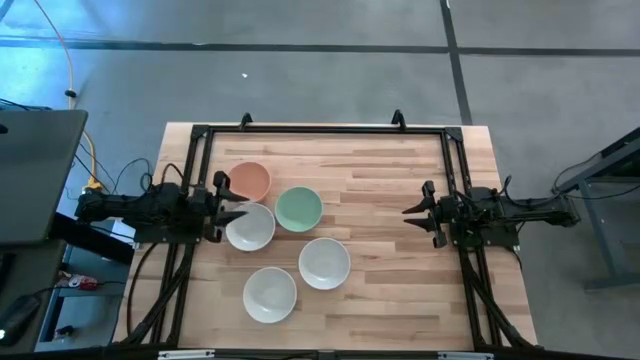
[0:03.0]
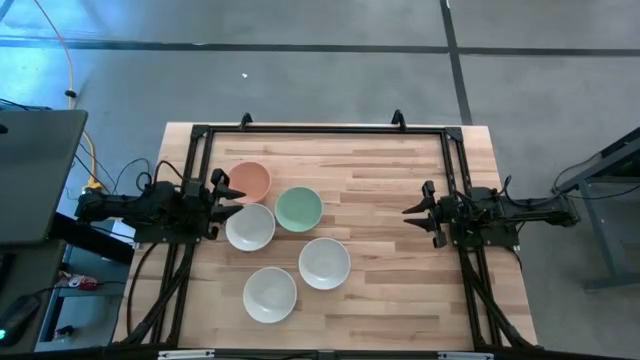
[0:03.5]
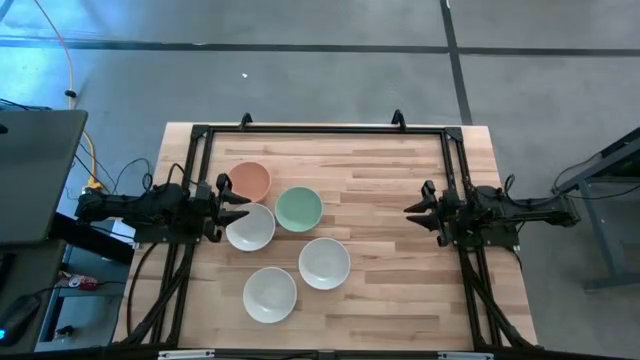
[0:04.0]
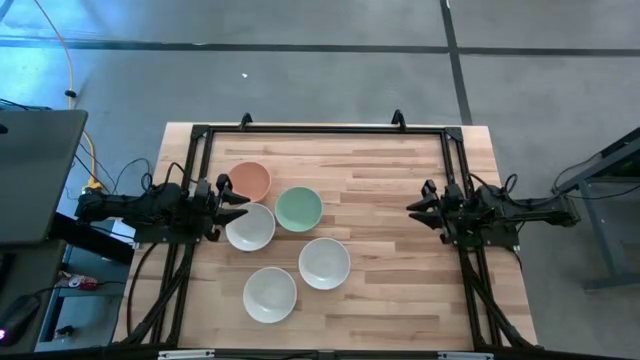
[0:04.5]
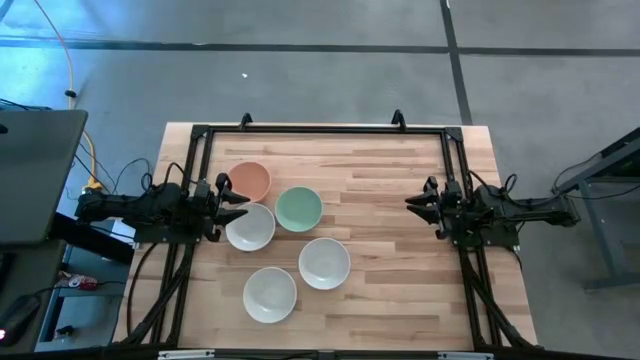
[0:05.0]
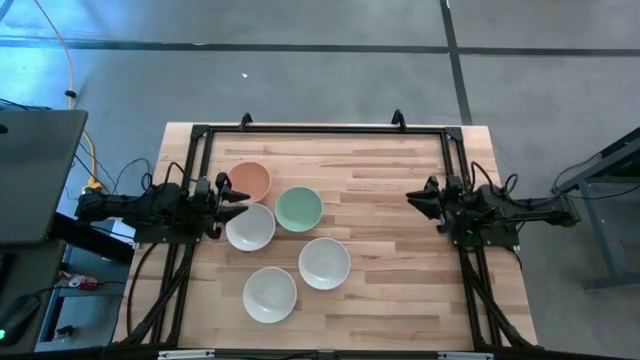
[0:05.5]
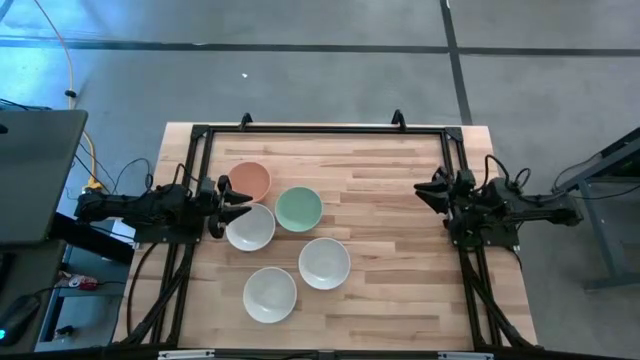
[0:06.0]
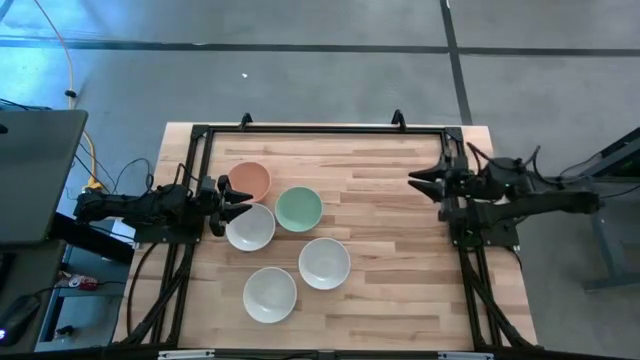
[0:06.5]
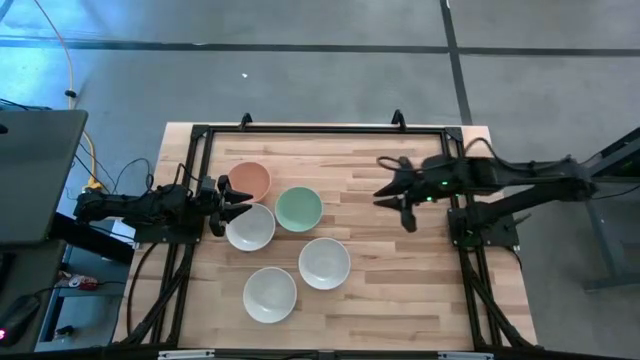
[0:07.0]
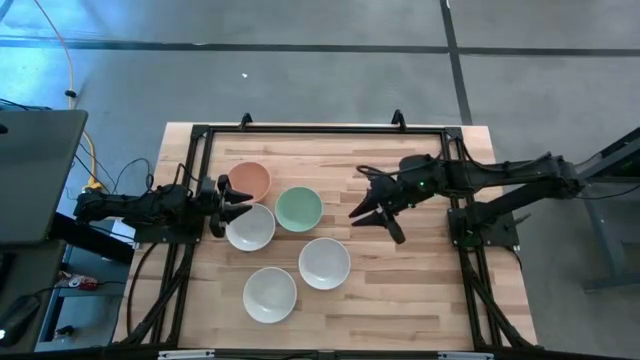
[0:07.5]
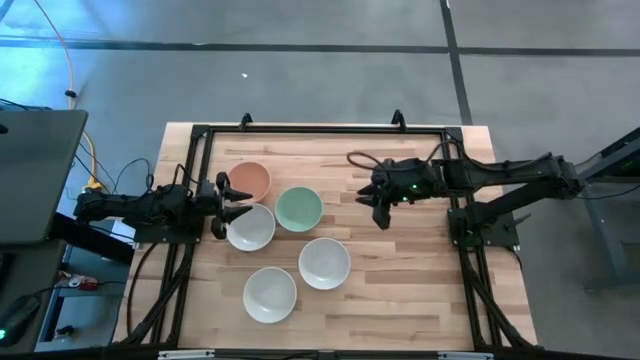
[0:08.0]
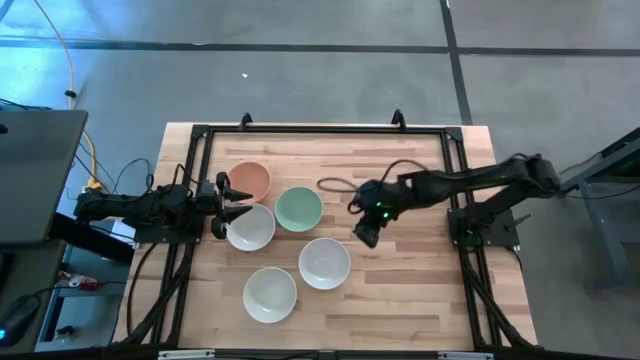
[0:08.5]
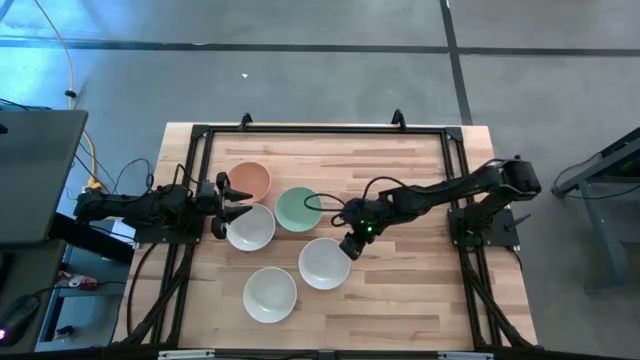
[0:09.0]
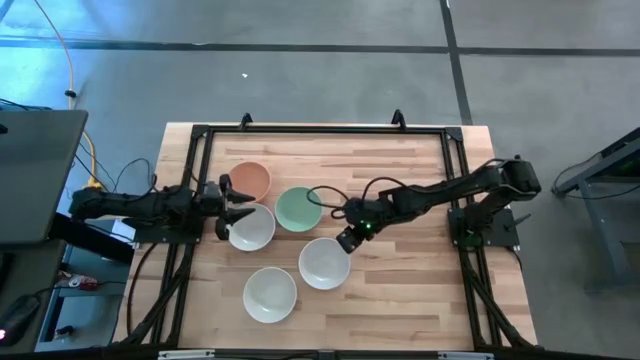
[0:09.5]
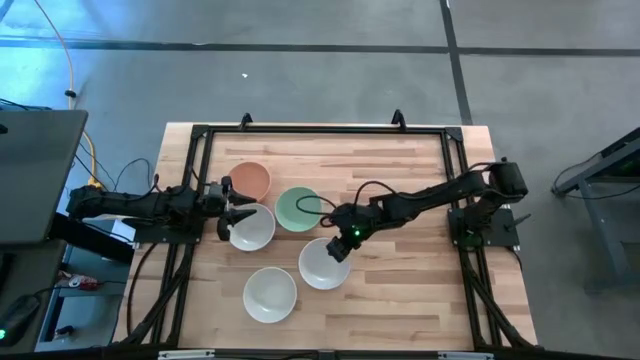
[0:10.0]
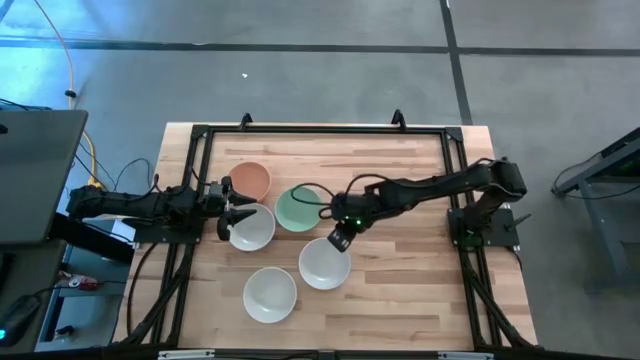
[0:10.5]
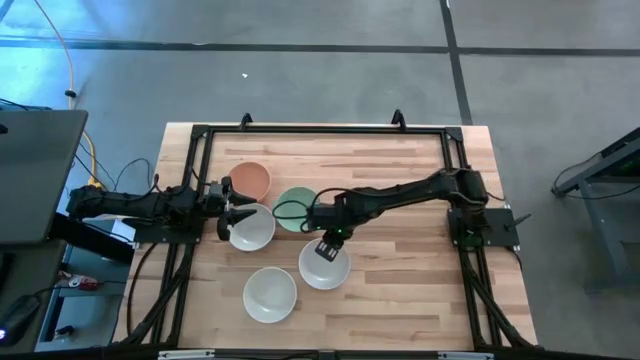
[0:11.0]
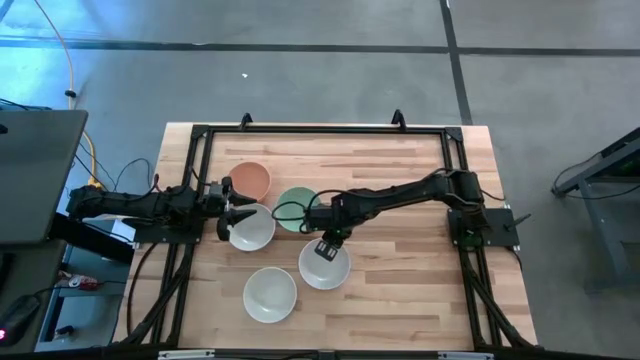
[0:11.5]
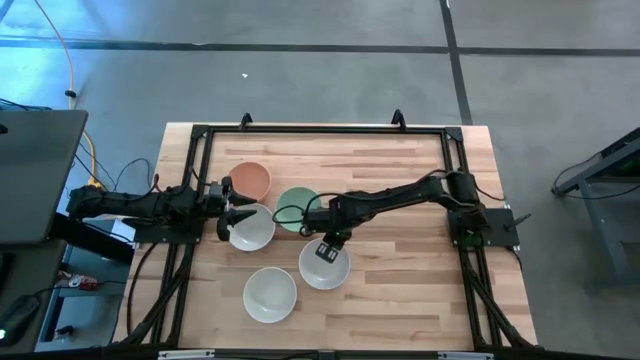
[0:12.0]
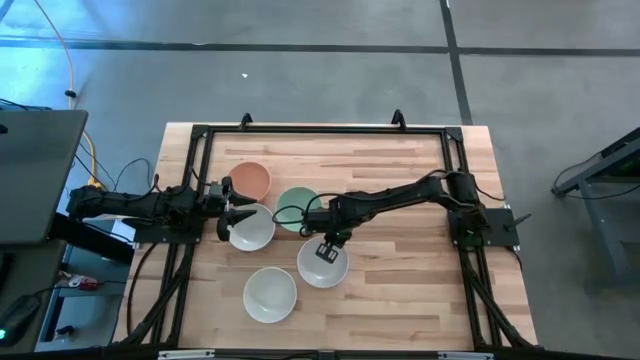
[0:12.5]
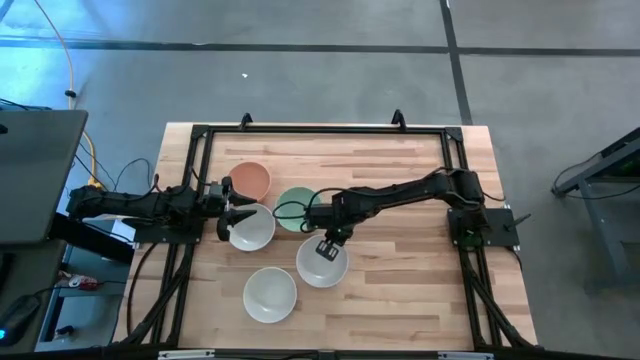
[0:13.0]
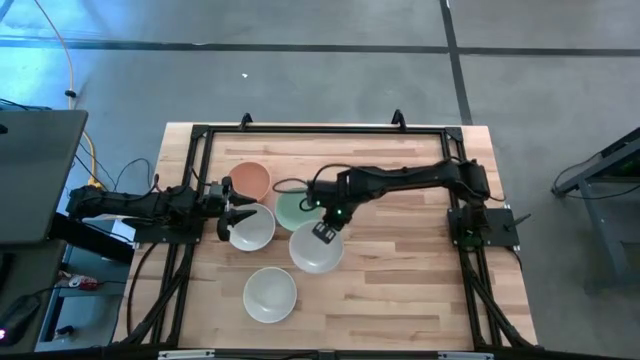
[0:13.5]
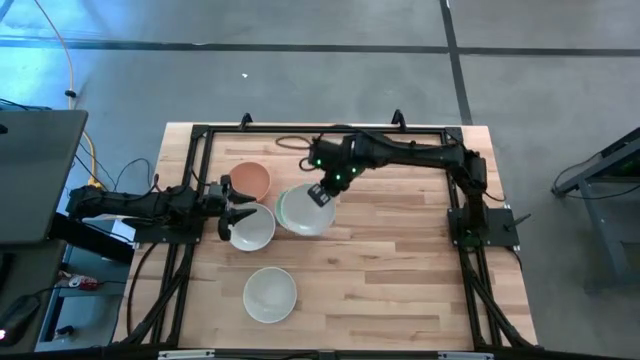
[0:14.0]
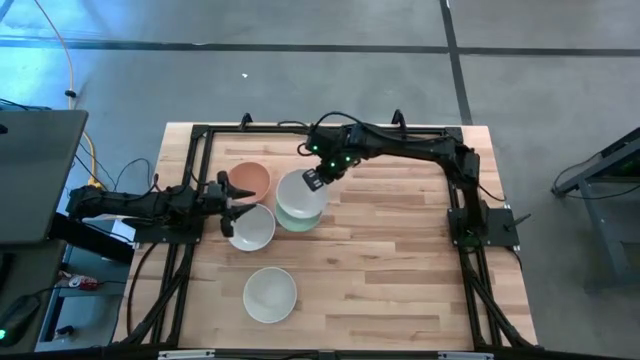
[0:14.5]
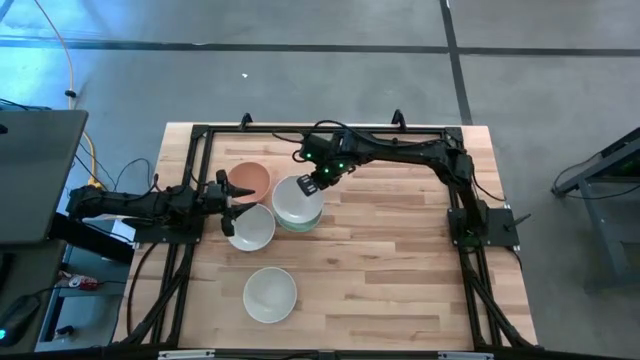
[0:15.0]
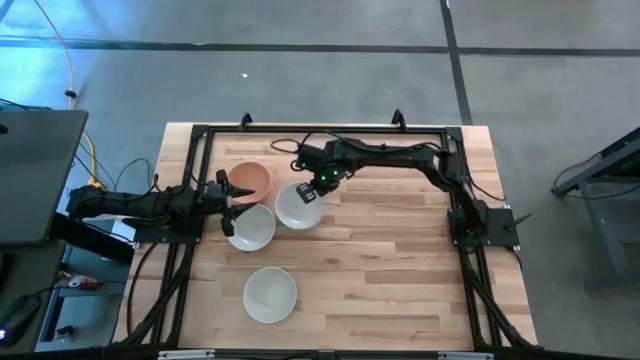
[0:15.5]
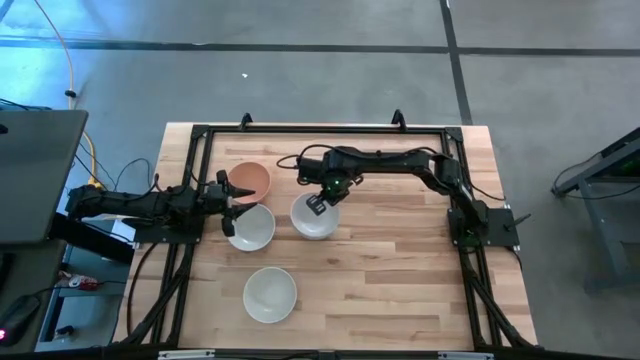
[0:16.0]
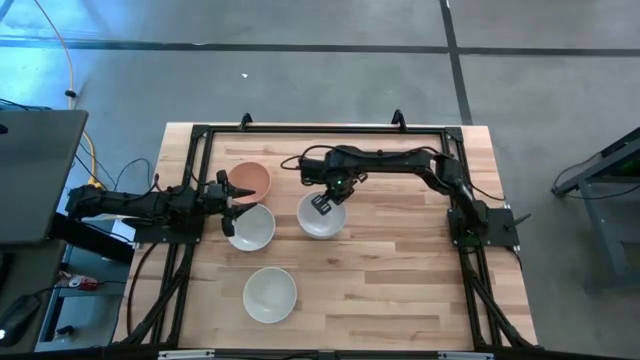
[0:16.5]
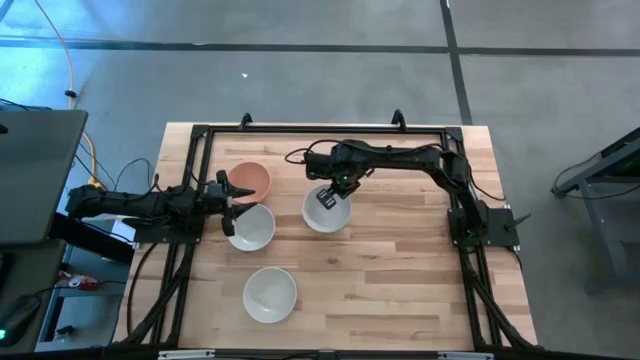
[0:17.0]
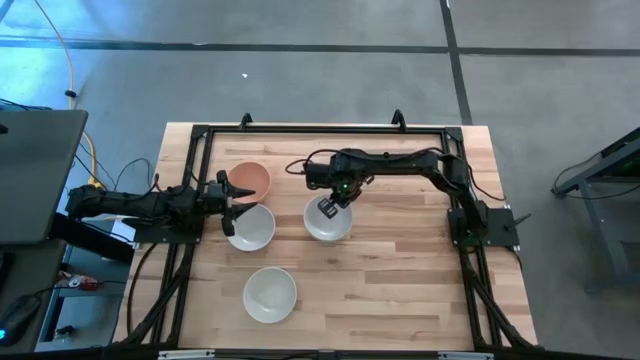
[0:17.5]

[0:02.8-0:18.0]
Task: Nest bowls inside each other
Stack the white bowl on the green bowl

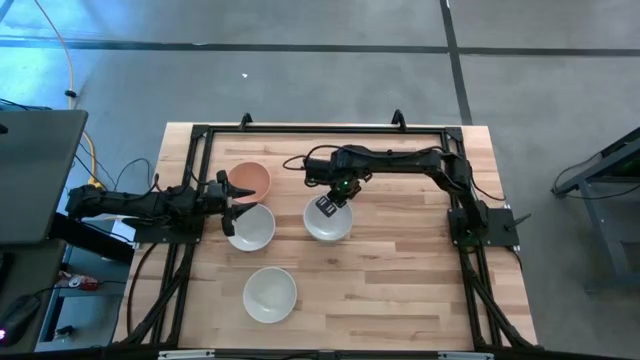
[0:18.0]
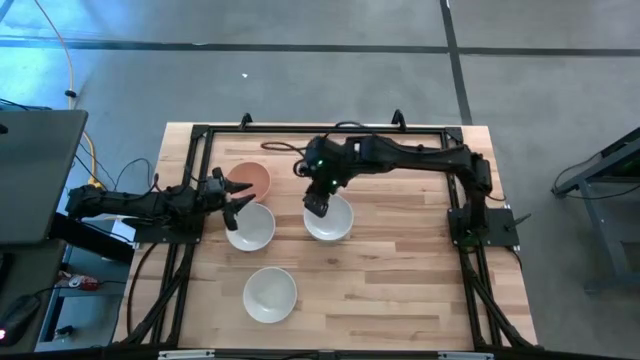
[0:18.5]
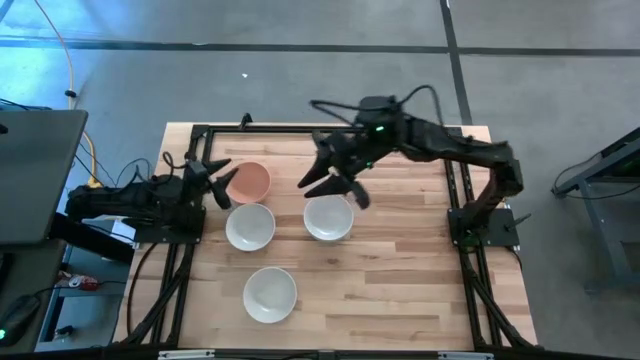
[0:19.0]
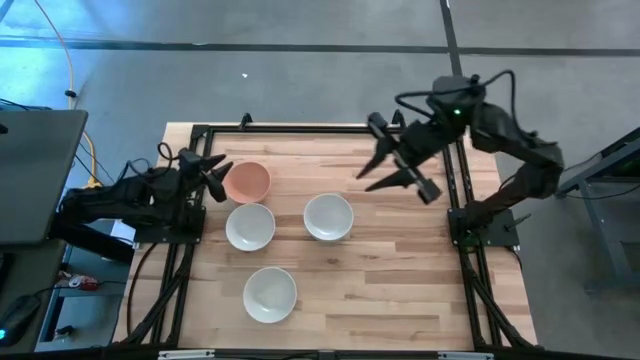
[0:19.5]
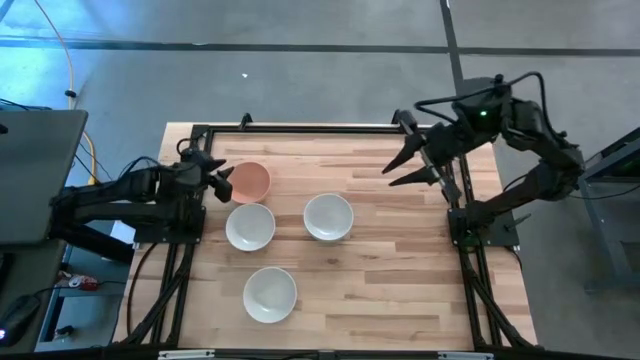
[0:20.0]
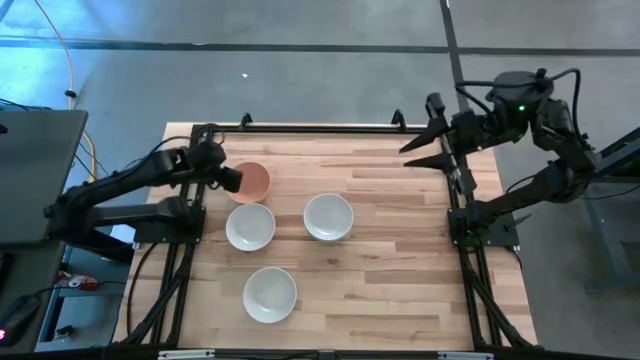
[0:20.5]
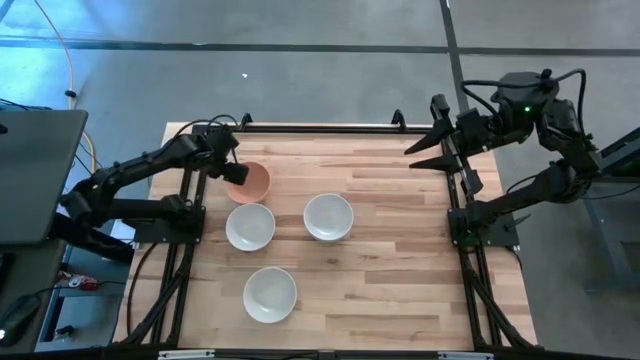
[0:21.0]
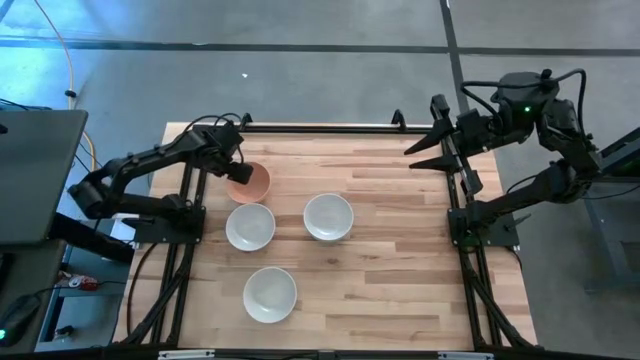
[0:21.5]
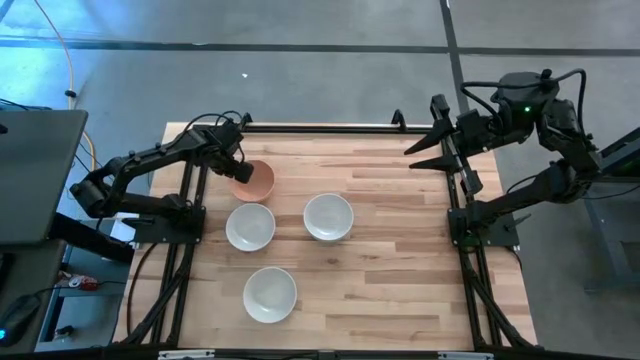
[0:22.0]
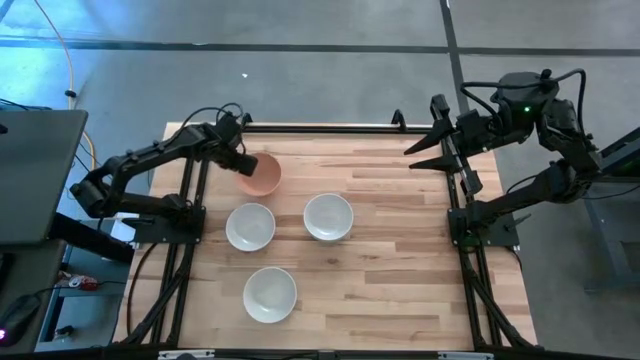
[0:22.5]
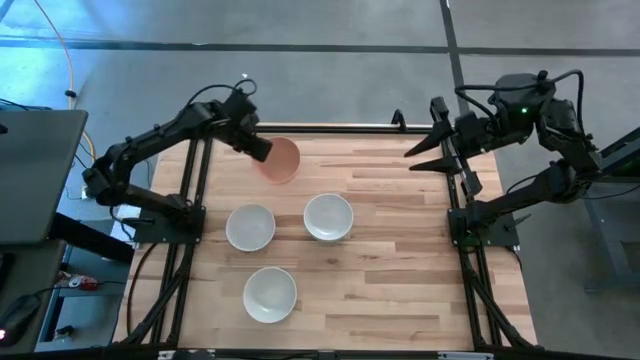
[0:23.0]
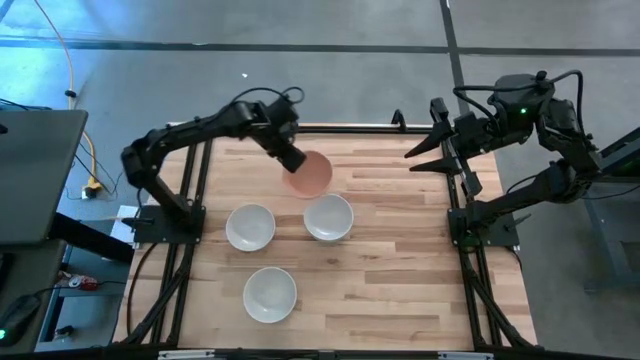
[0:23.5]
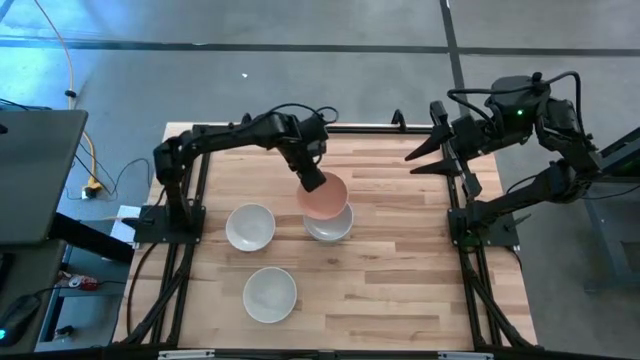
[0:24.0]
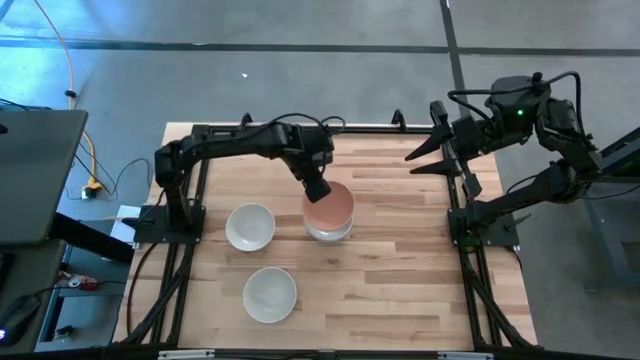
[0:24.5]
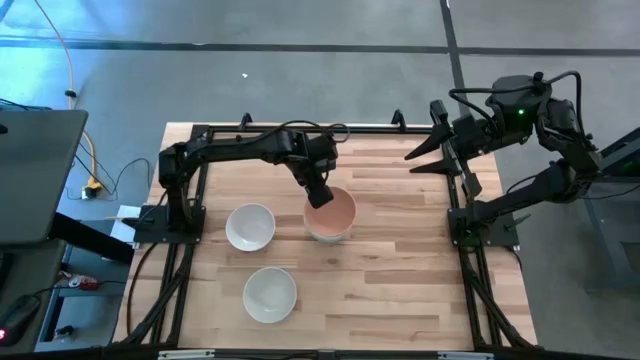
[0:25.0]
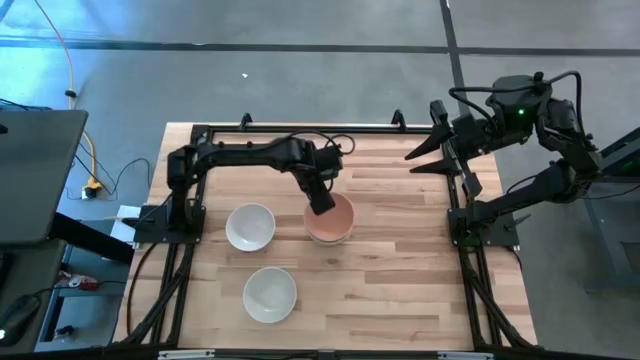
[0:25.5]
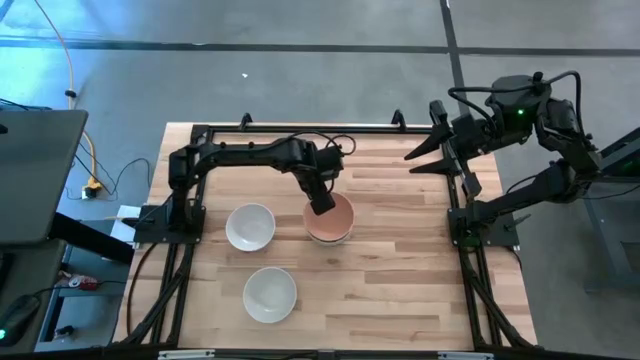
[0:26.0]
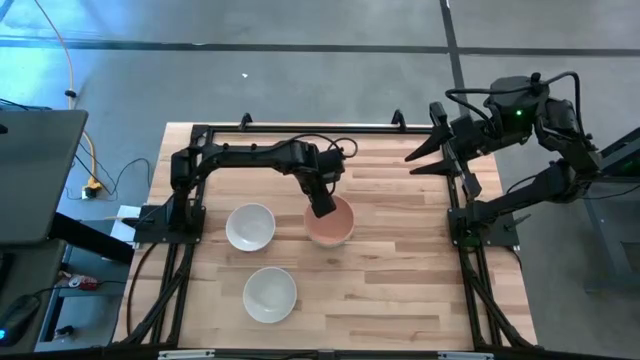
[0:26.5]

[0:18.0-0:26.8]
Stack the light orange bowl on the white bowl
